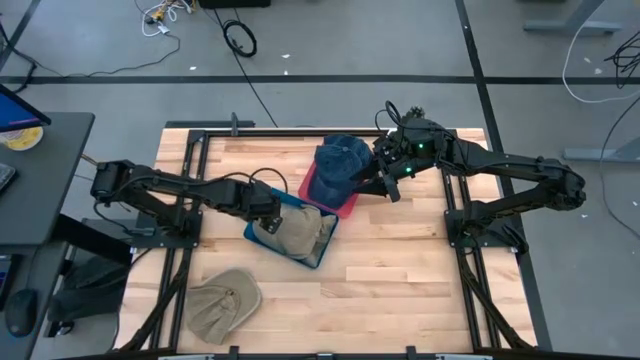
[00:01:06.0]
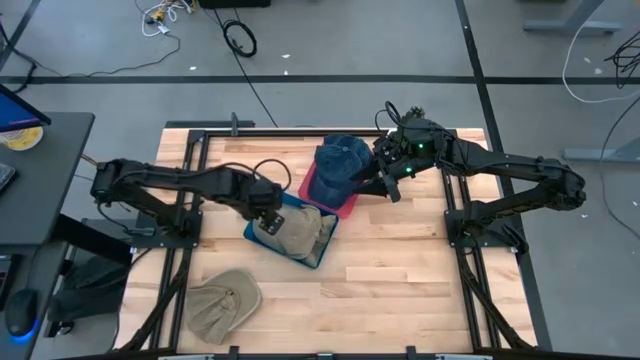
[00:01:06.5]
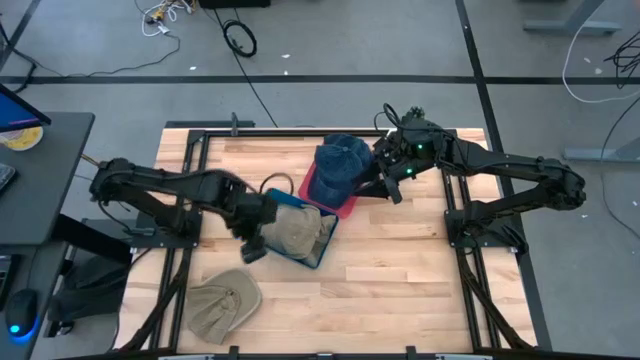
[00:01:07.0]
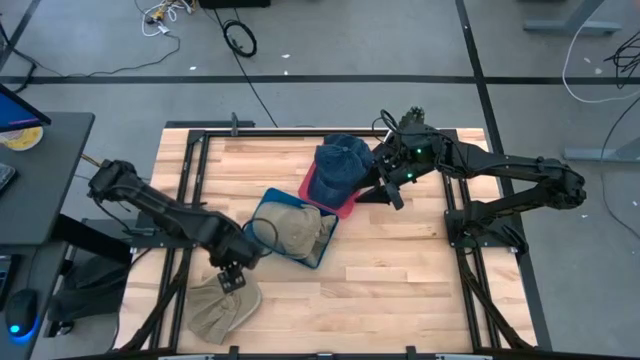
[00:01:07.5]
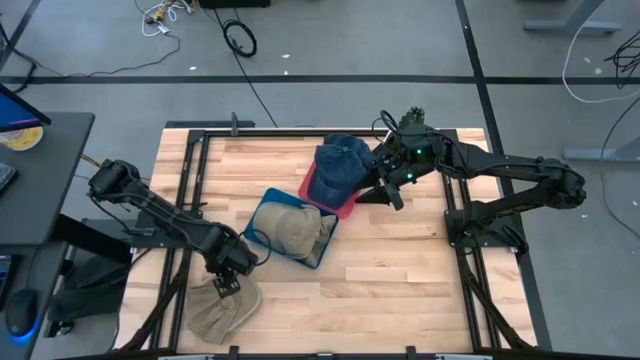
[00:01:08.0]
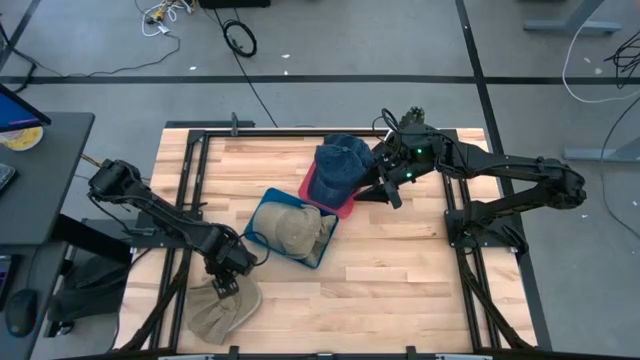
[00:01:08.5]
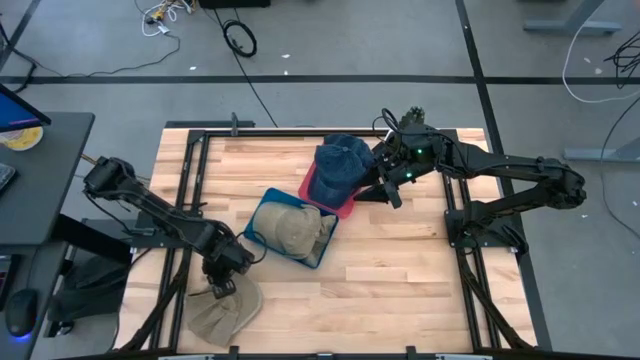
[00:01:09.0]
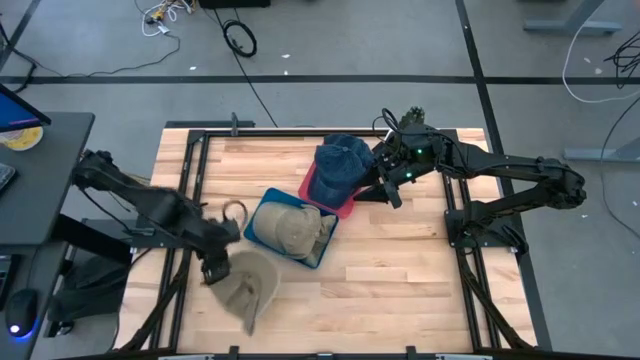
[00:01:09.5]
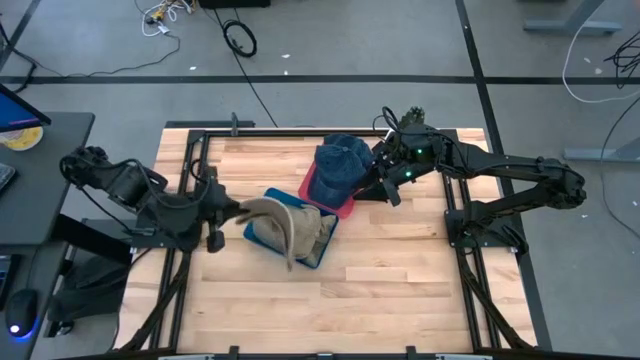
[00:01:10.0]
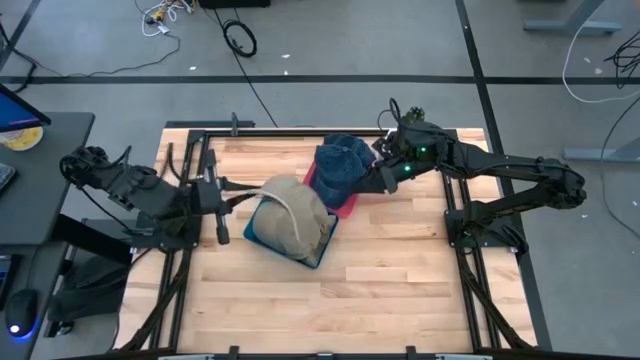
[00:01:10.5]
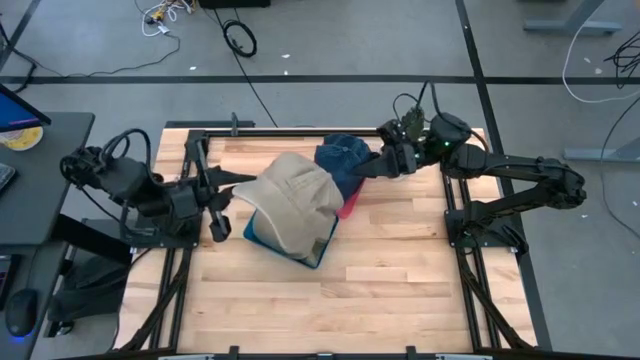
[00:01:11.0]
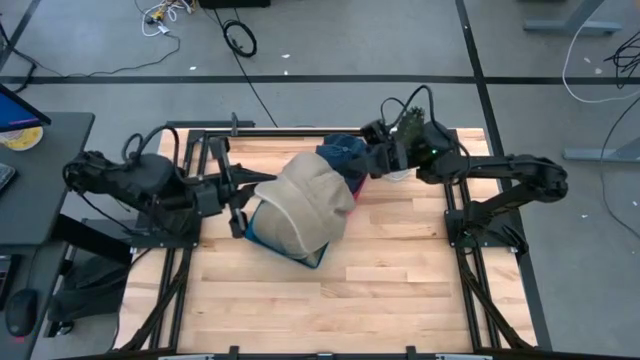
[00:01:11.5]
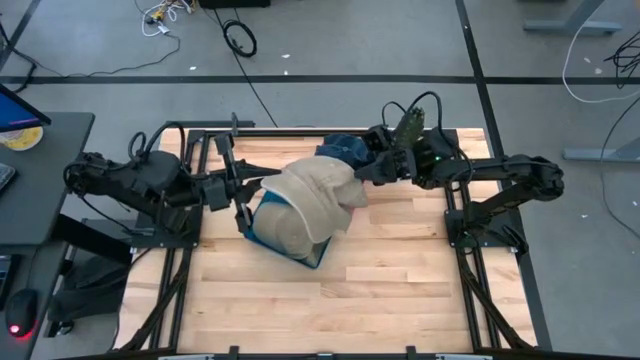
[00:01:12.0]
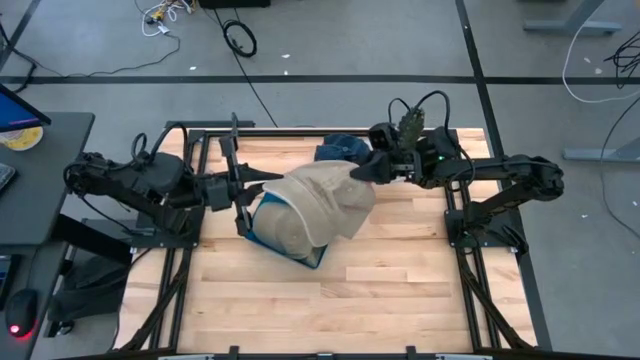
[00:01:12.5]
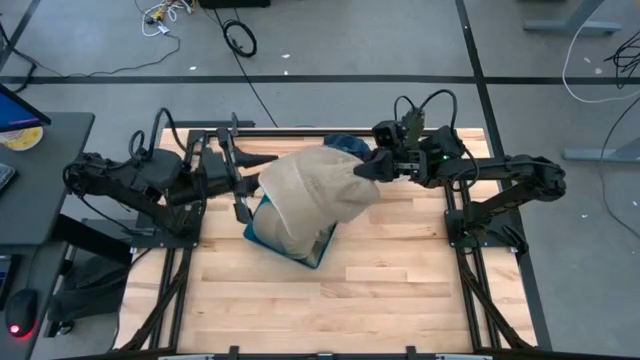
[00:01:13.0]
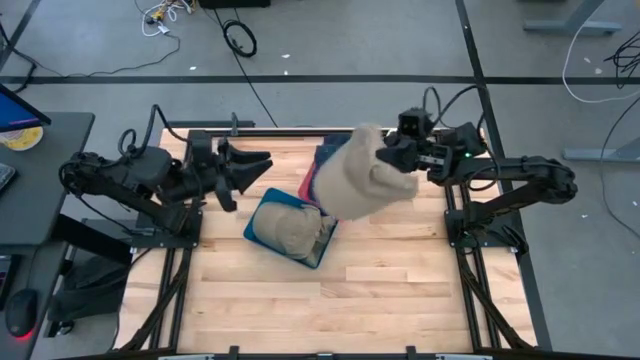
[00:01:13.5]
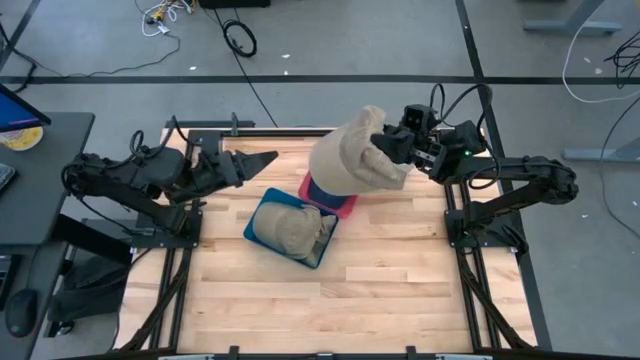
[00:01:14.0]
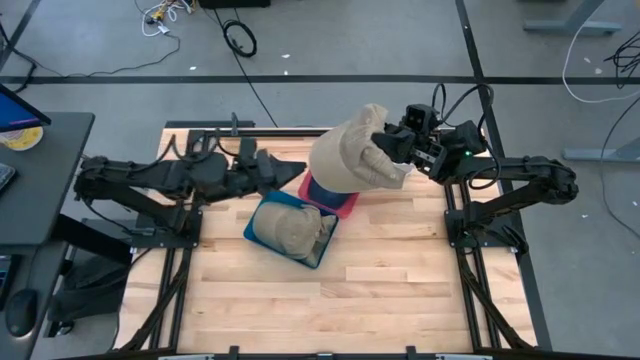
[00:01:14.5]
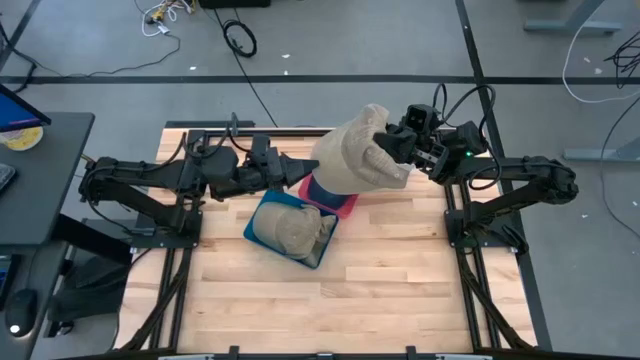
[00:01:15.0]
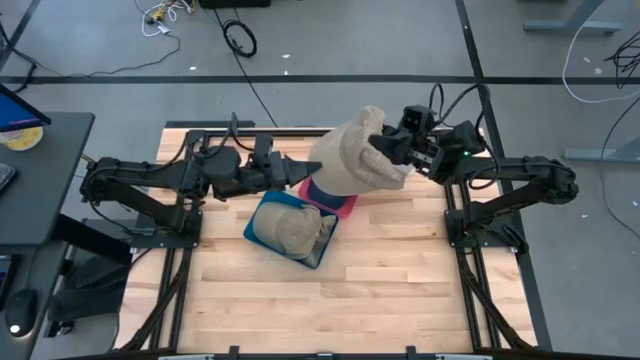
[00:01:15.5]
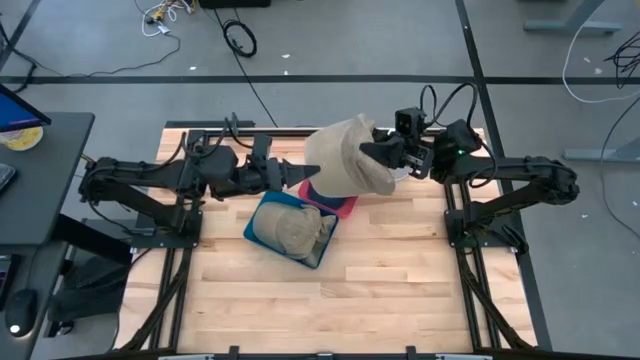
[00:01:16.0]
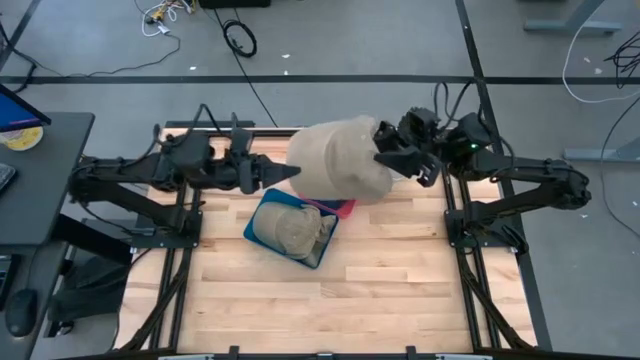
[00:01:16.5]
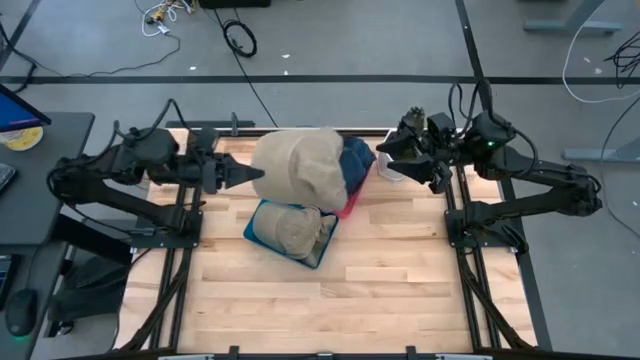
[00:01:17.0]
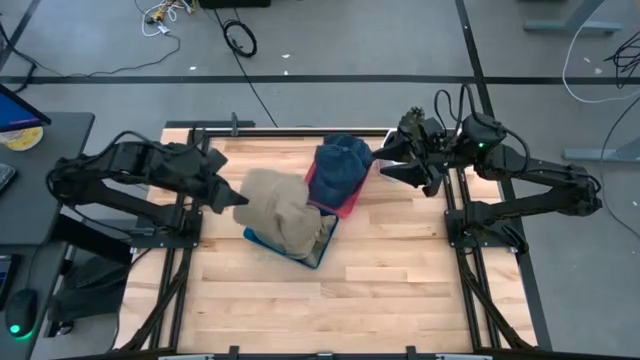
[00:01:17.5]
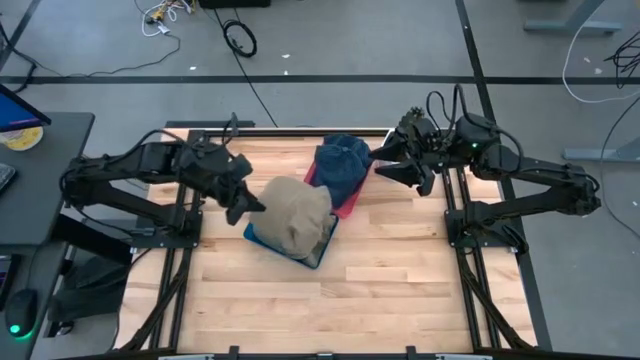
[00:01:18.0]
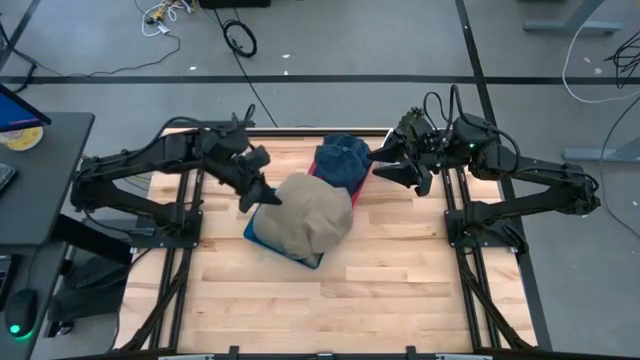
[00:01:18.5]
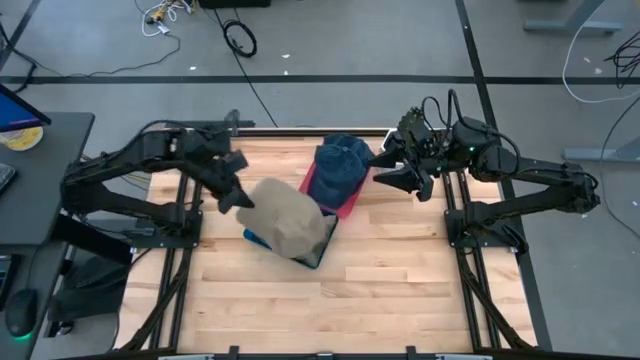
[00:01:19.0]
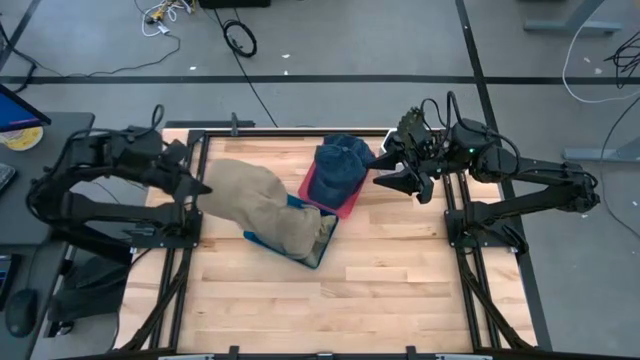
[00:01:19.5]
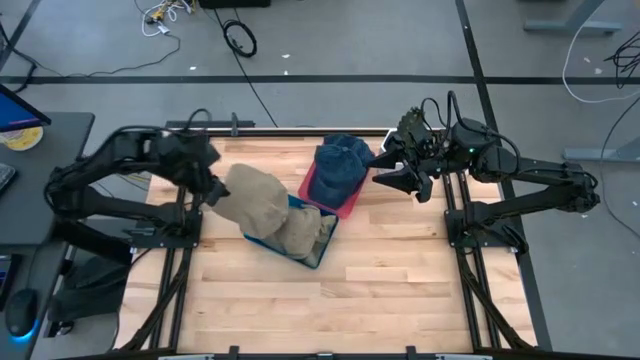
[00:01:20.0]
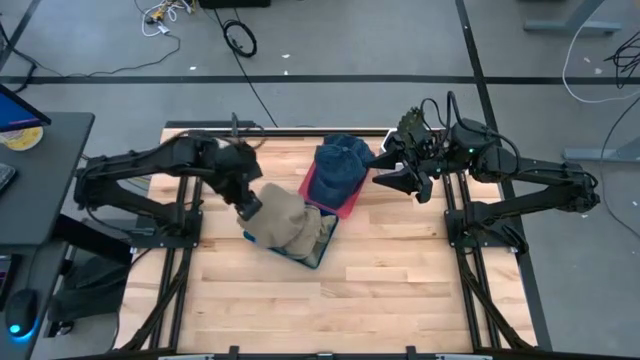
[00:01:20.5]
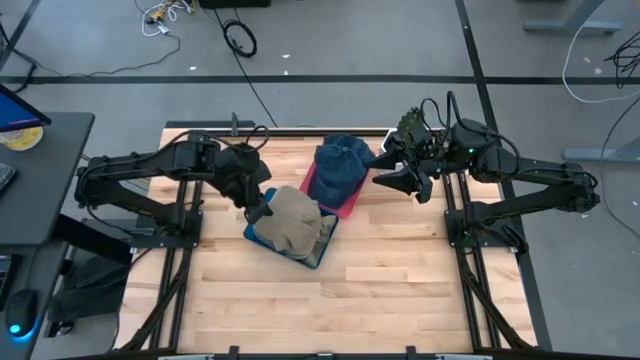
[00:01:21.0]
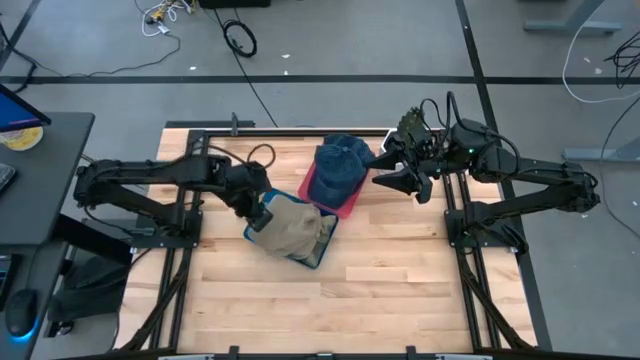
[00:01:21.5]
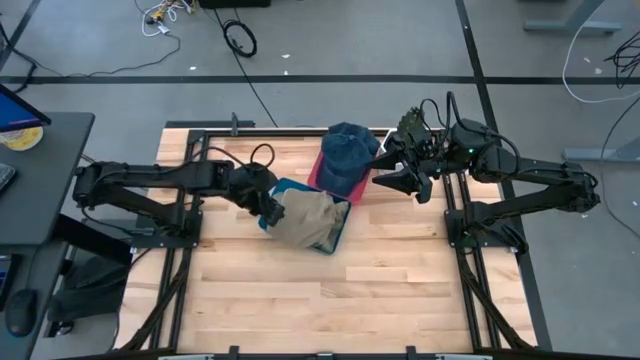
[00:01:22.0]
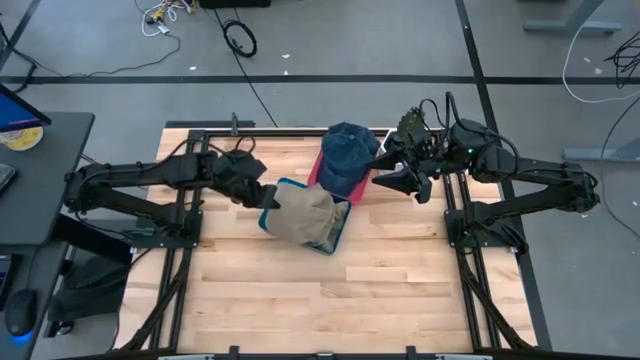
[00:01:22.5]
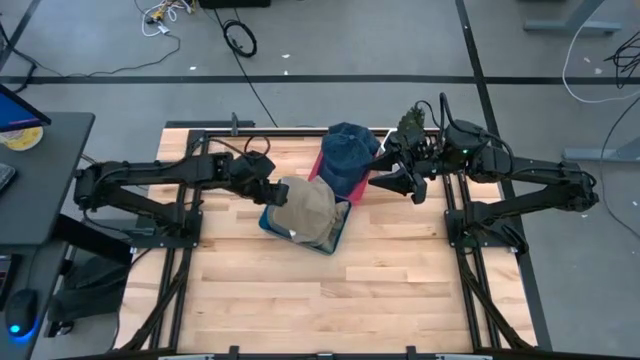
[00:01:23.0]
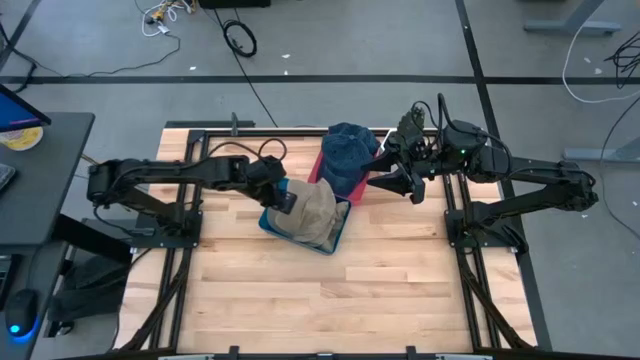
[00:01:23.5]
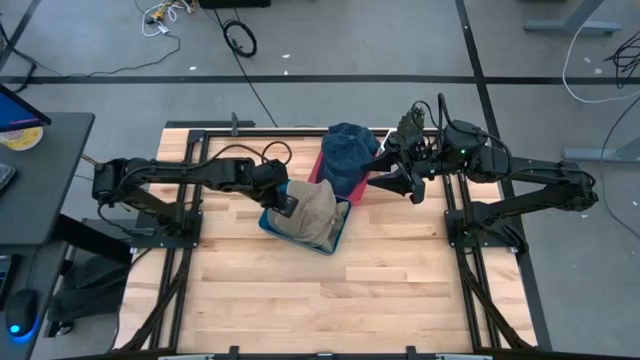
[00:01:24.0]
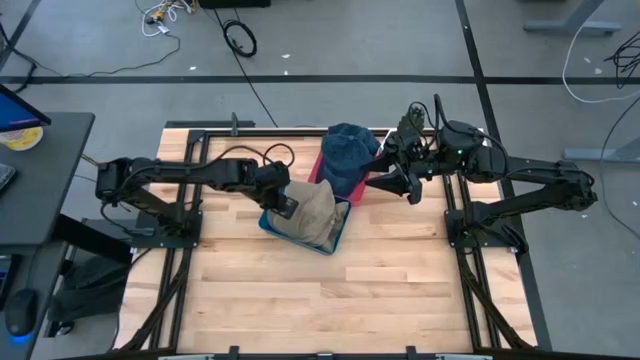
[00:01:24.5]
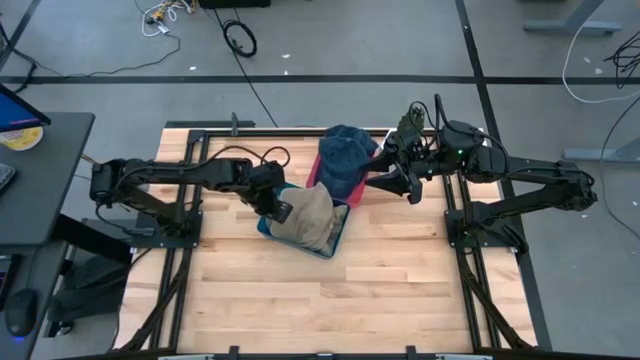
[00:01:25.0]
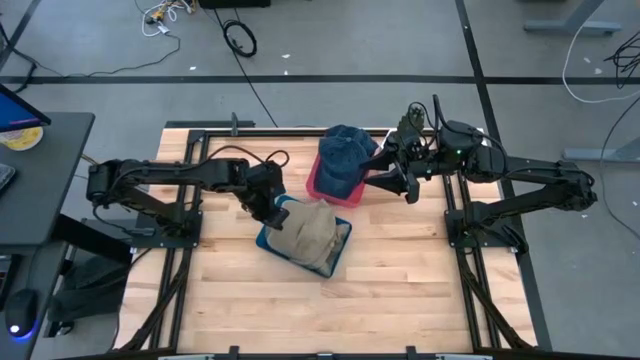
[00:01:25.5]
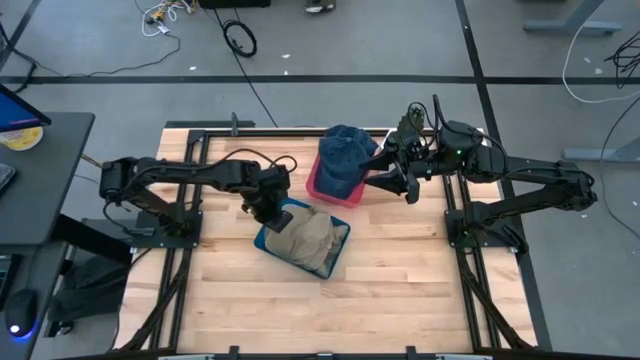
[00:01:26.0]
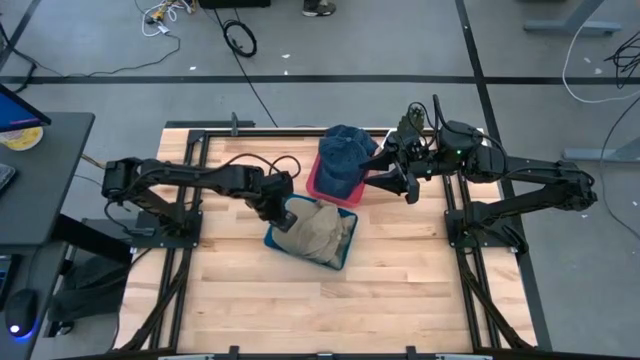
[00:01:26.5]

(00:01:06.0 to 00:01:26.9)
Task: Pick & Place hat
Put the brown cap into the blue bin
